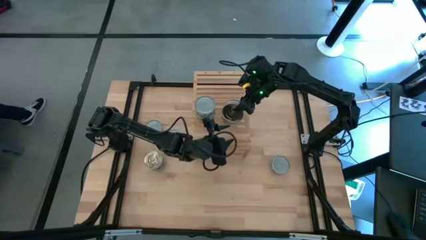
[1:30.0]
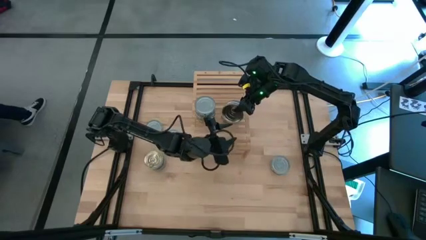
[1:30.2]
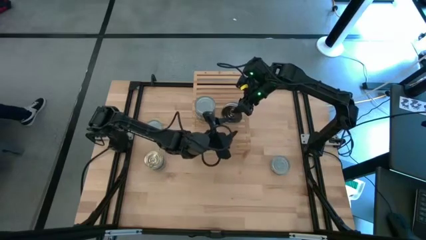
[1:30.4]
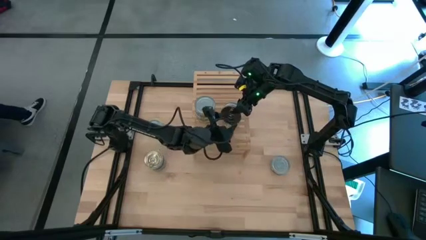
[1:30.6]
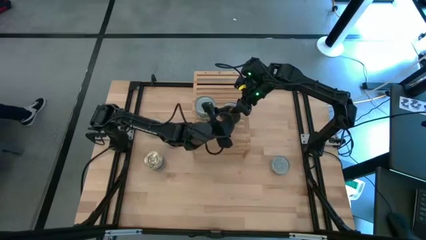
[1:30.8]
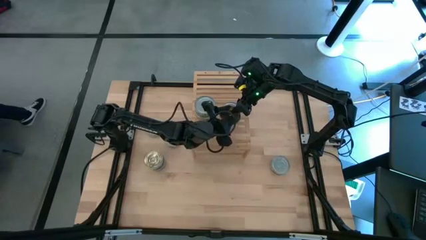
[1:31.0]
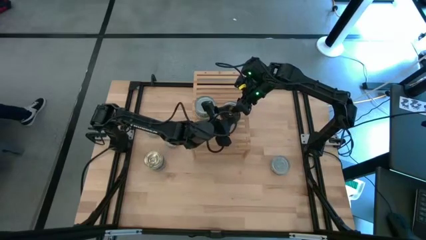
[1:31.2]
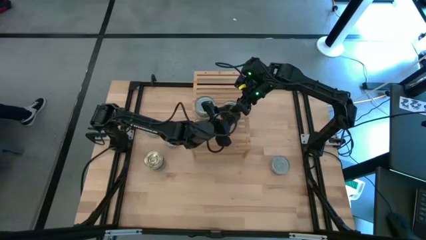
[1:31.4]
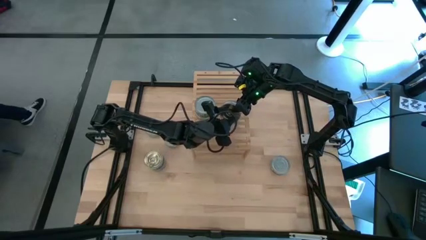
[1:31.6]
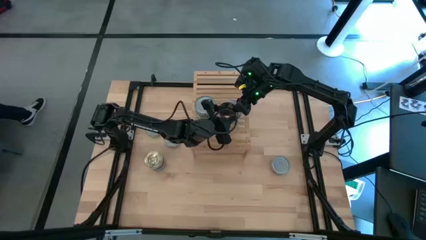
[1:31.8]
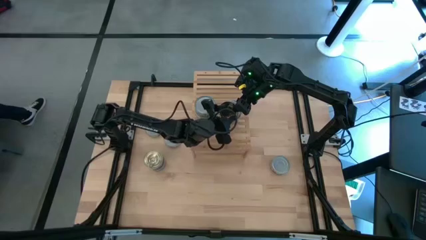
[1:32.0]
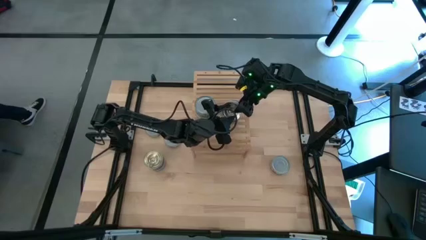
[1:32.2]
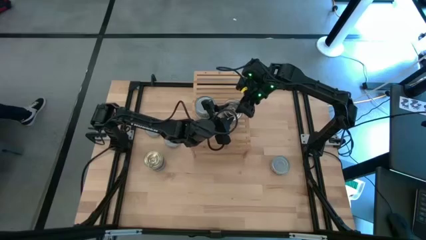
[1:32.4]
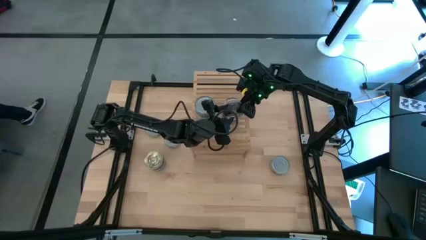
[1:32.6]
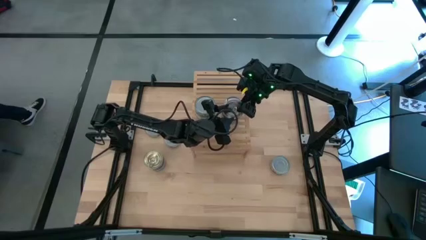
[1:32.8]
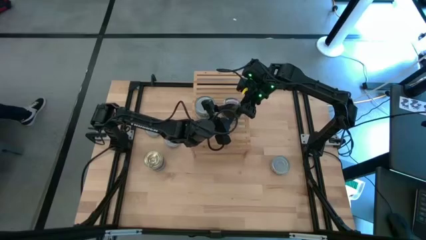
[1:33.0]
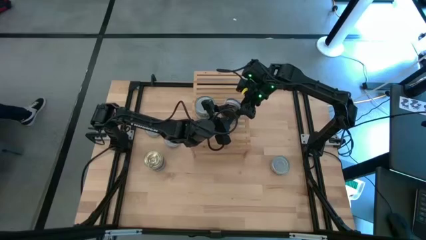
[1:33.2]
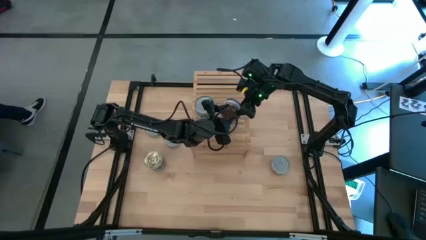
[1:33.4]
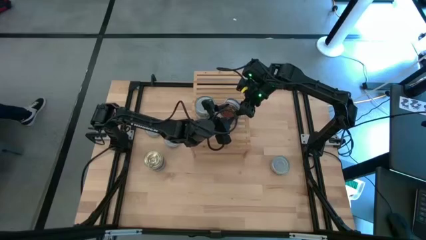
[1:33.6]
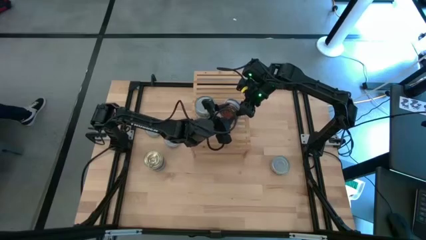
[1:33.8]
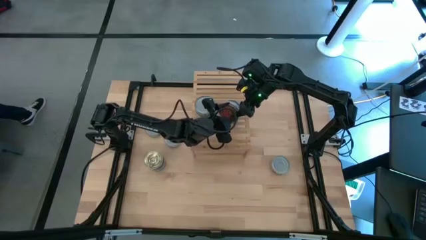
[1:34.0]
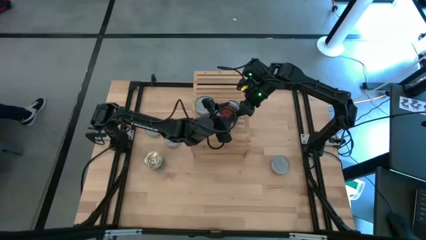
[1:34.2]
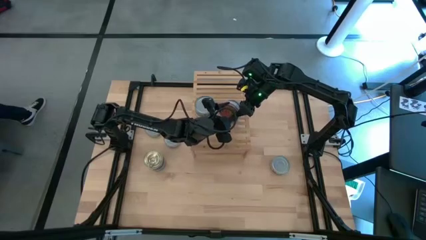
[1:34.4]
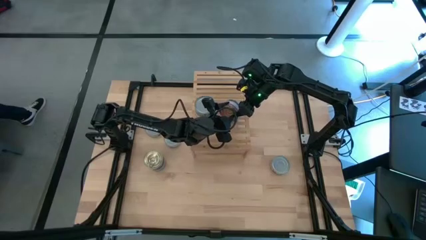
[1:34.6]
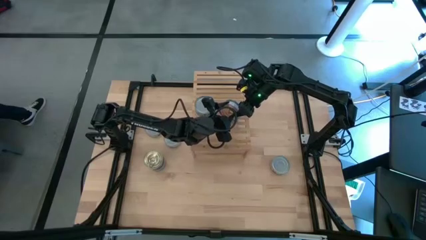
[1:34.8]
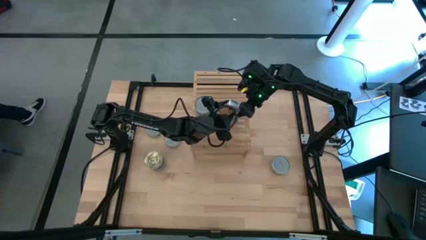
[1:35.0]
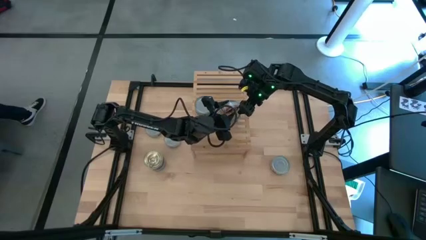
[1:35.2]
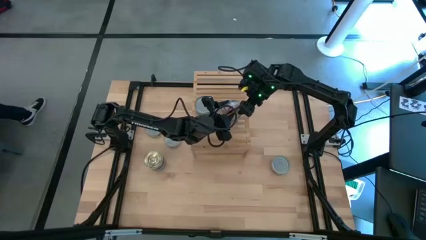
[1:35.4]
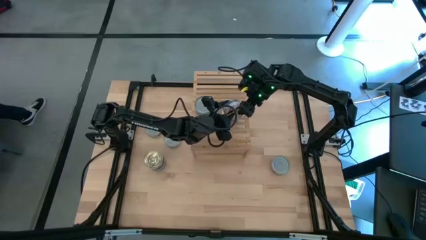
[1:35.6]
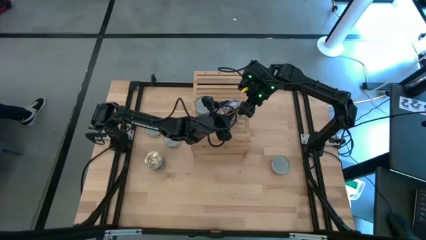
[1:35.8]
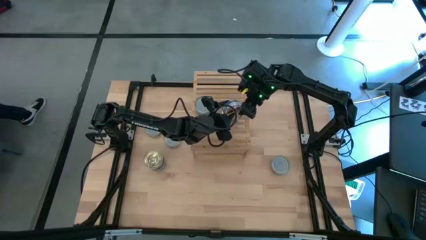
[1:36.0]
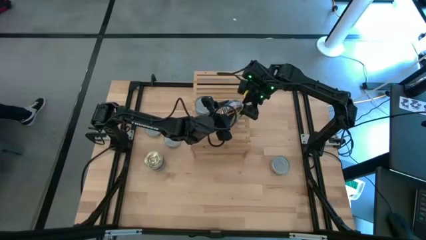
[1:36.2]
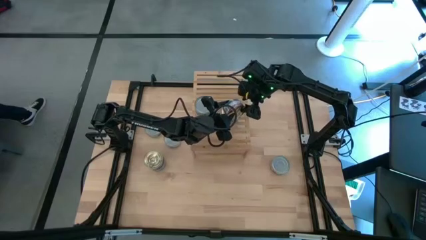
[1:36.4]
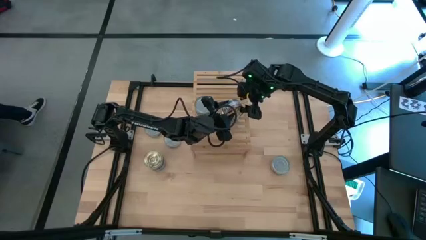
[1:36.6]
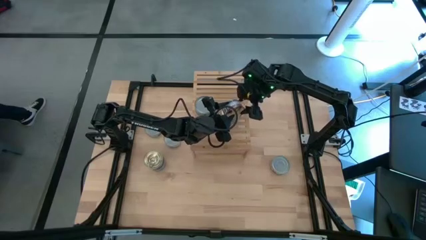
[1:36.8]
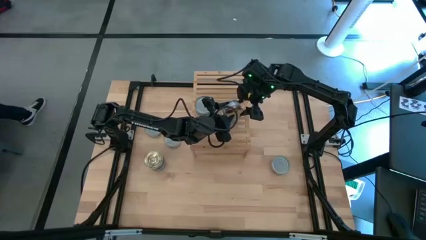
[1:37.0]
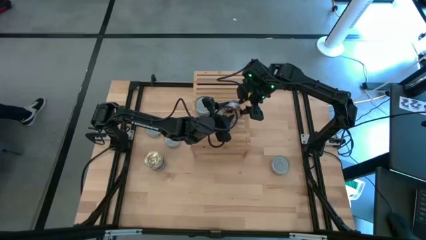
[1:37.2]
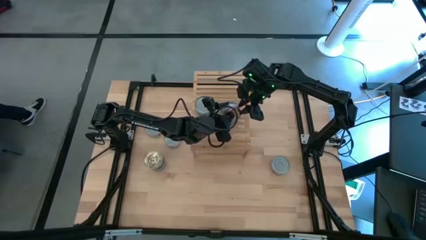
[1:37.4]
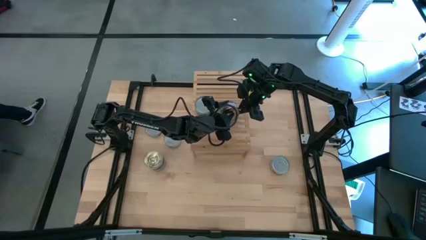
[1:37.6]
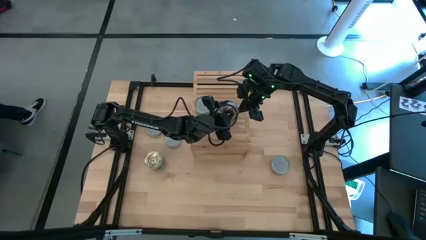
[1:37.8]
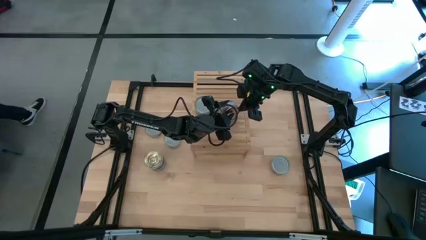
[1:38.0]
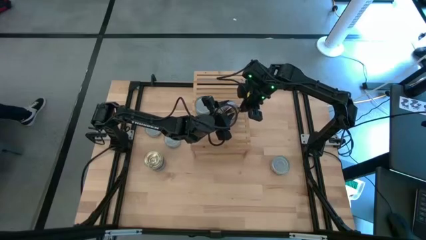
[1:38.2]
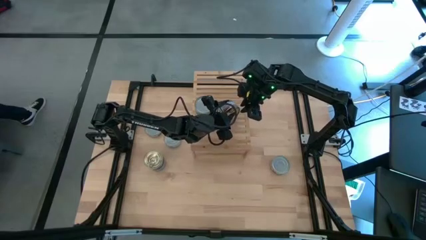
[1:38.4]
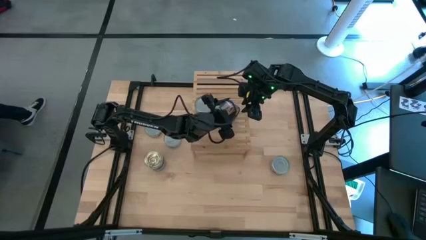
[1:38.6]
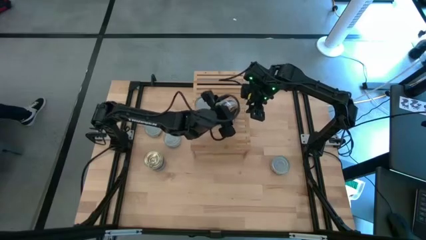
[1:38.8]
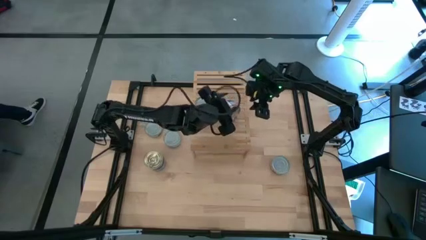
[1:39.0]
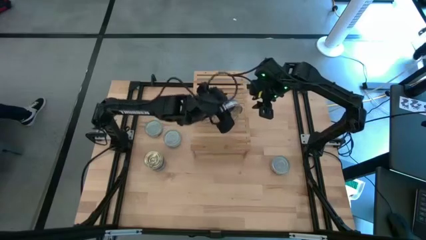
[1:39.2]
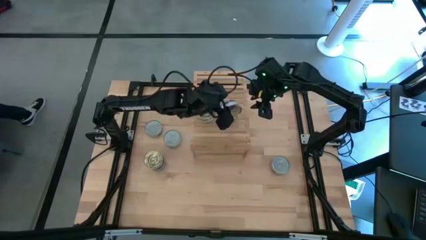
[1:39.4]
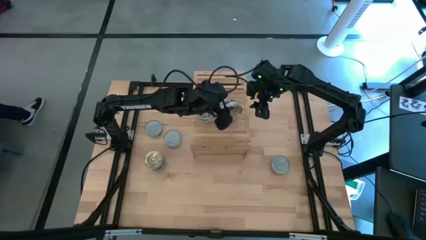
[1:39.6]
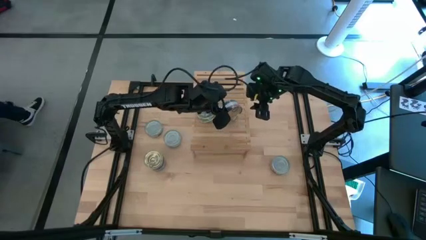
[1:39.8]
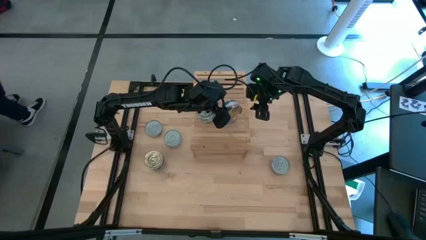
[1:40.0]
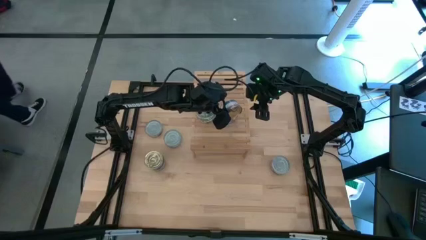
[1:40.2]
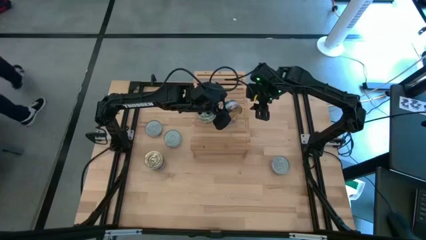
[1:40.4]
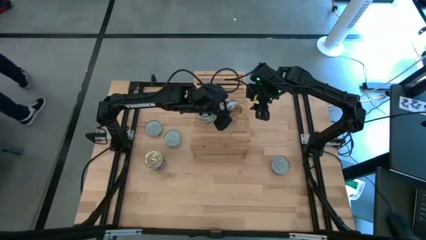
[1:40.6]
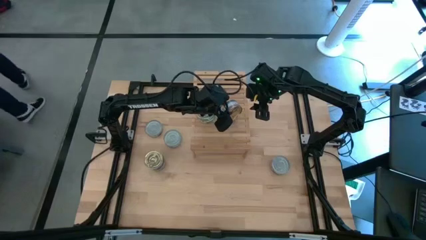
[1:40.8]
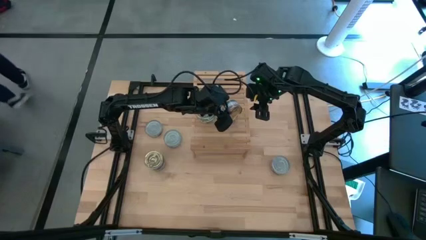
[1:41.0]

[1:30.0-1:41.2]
Task: Stack canned seafood by type on shelf
Stack the blue tuna can on top of the blue tuna can on the shelf

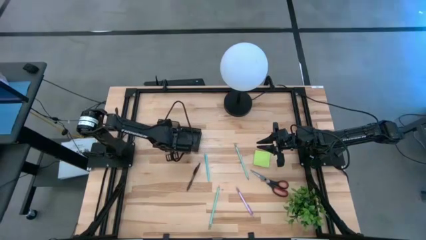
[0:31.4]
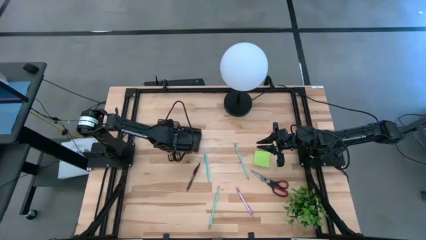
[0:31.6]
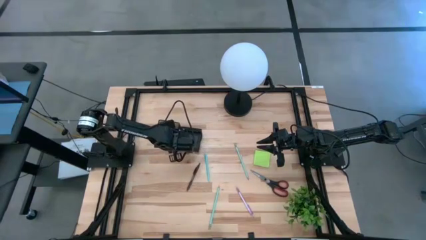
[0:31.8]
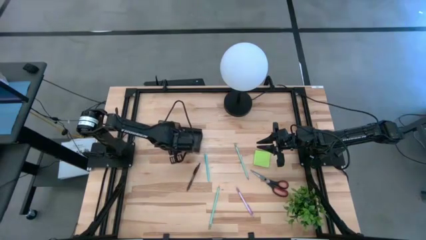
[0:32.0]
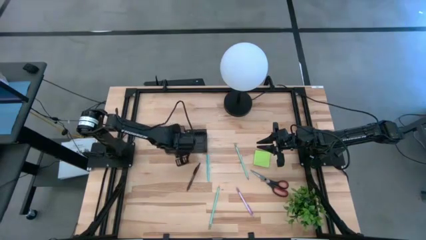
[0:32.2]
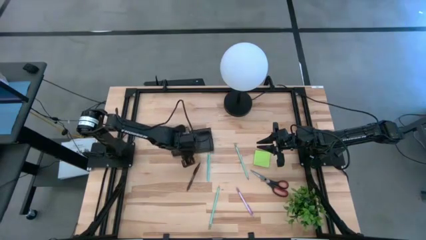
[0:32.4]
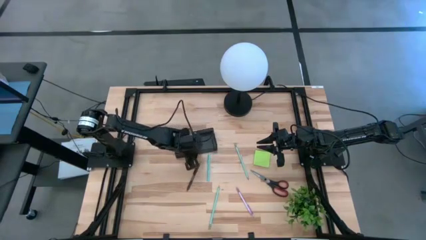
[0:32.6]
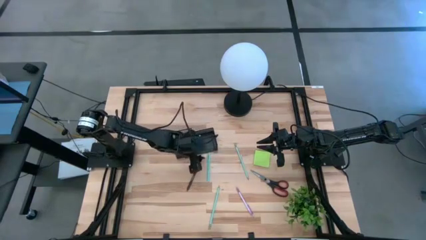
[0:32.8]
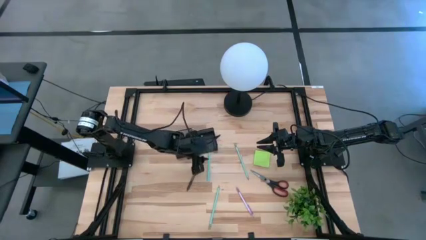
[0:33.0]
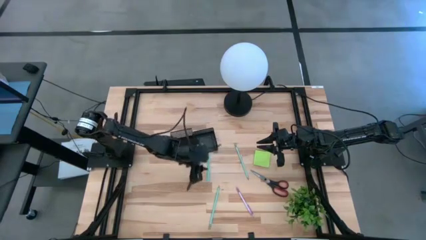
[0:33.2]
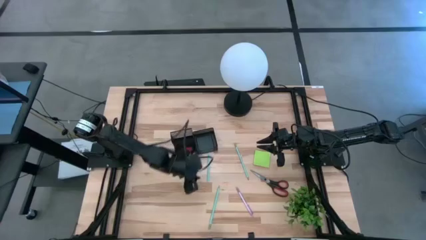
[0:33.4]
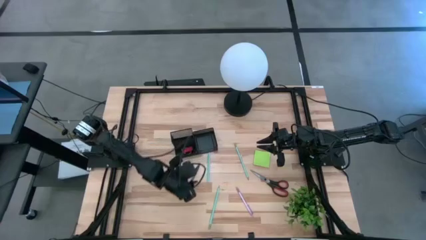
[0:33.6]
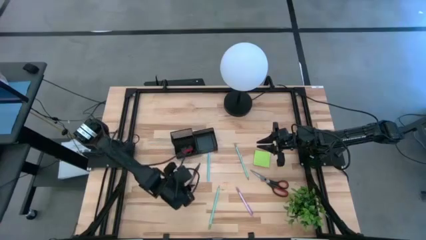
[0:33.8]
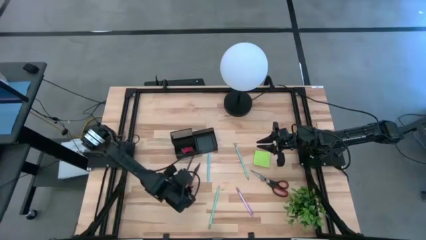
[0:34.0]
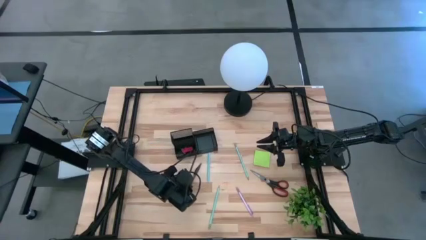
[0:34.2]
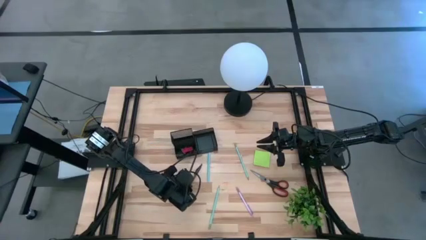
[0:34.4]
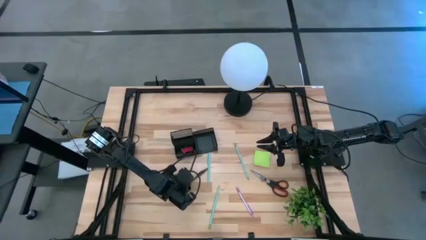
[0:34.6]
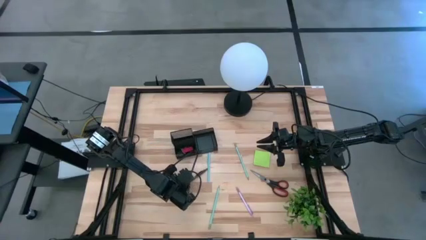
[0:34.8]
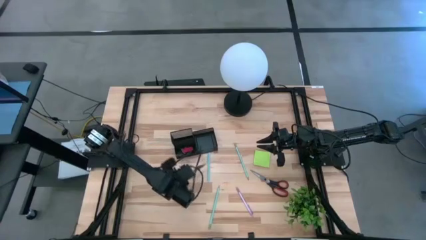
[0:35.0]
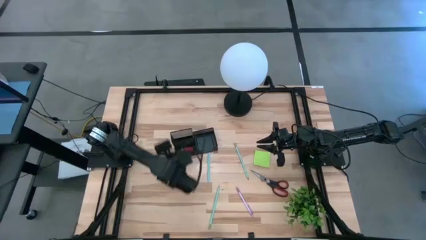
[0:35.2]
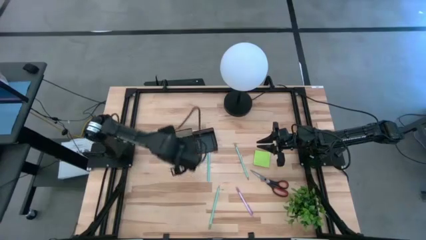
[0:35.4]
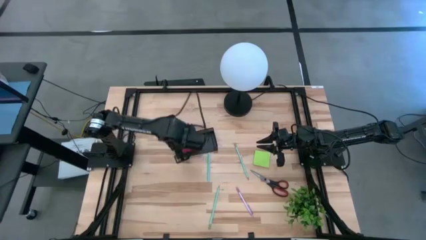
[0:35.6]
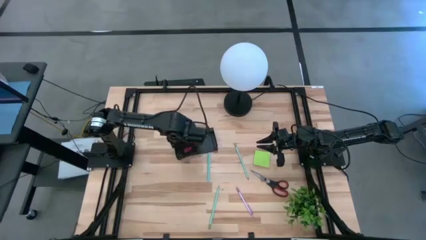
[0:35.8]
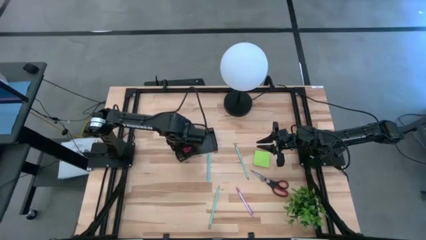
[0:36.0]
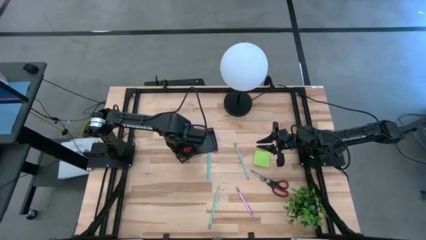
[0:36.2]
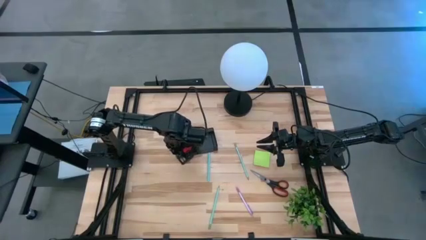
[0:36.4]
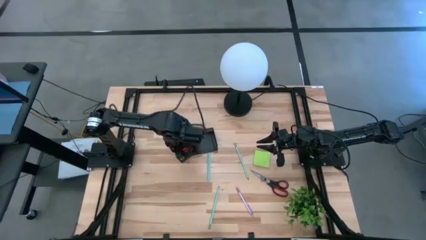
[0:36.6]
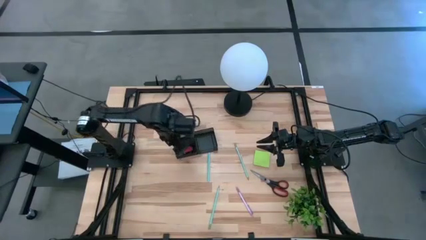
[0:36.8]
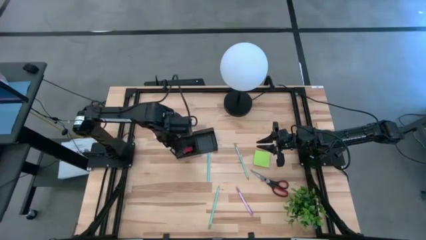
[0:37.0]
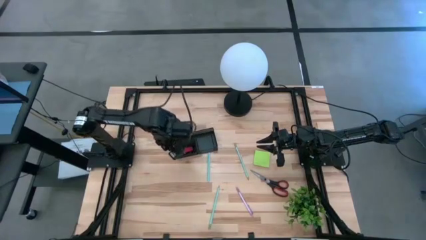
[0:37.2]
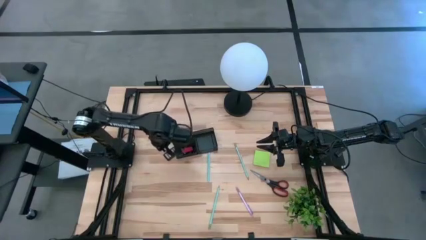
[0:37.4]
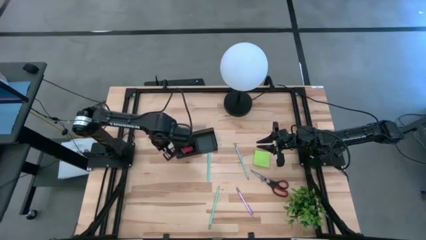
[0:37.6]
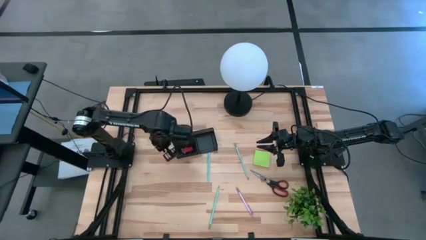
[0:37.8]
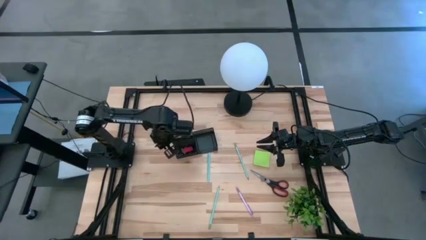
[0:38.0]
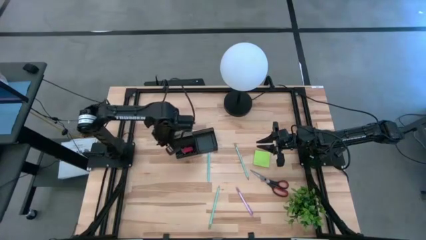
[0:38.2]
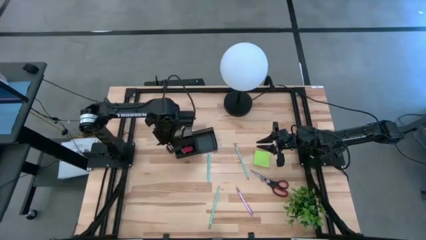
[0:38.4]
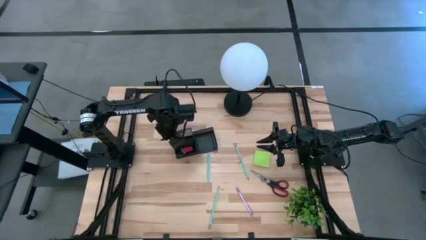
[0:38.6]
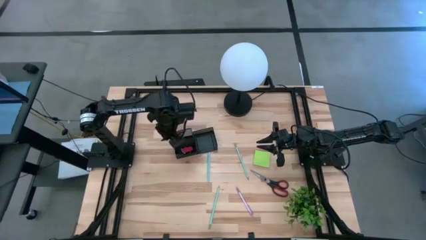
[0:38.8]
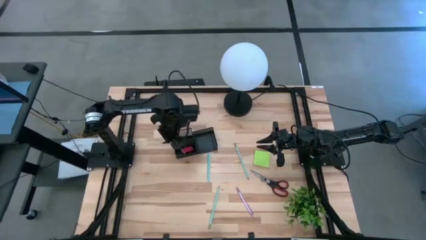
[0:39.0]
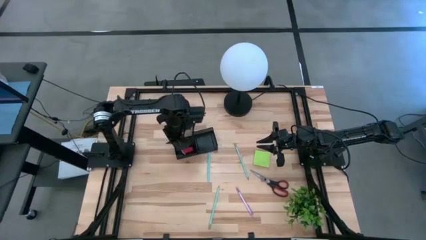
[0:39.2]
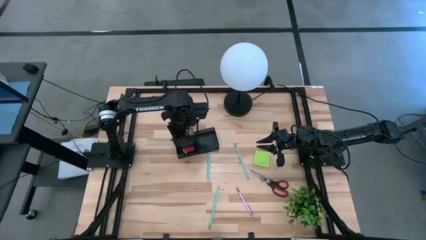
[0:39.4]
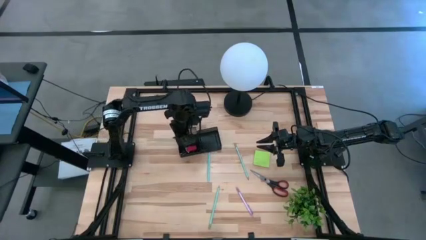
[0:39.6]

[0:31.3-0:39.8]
Task: Pick and place office supplies into organizer
Put the brown pen into the black desk organizer
